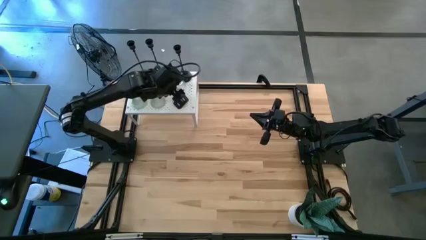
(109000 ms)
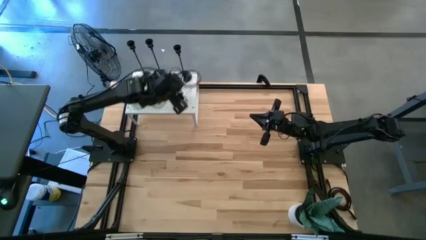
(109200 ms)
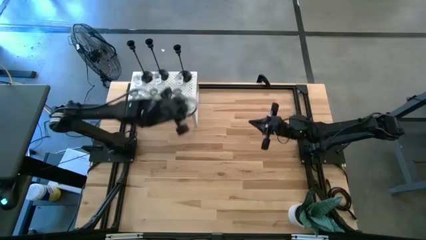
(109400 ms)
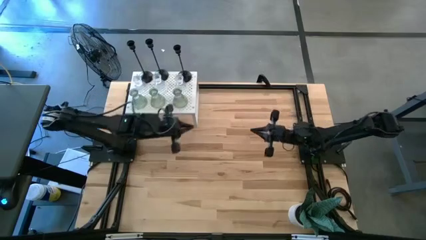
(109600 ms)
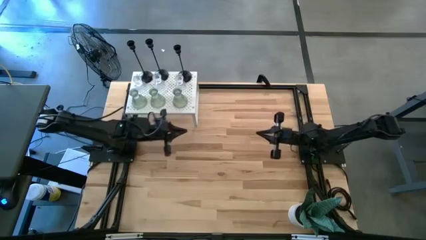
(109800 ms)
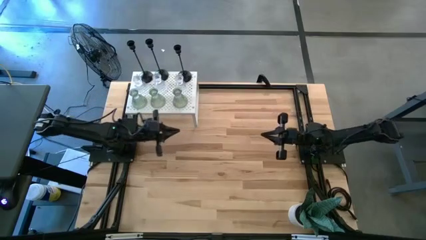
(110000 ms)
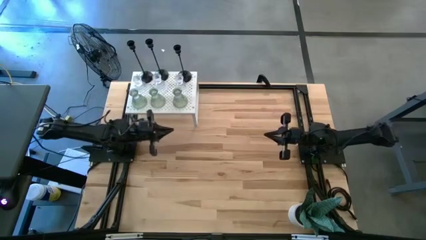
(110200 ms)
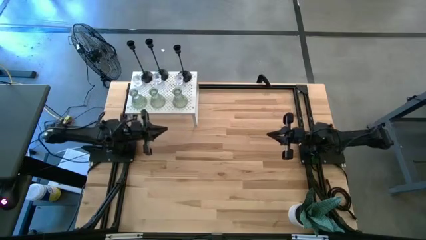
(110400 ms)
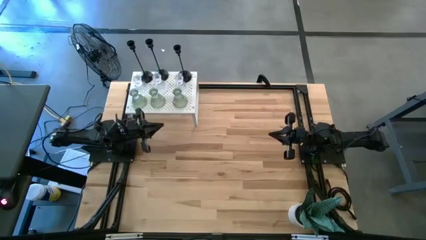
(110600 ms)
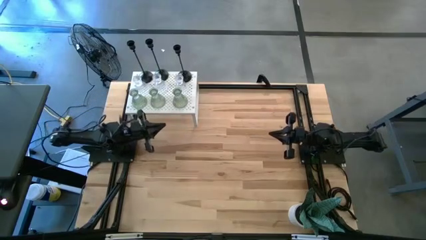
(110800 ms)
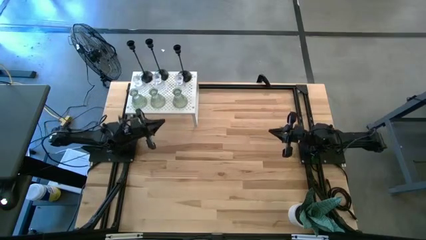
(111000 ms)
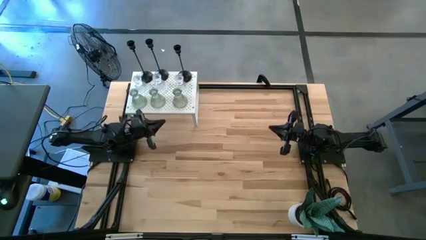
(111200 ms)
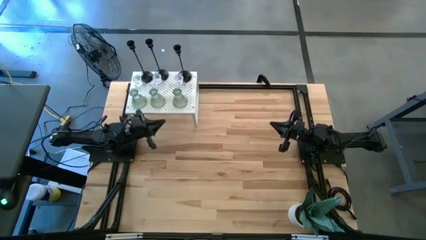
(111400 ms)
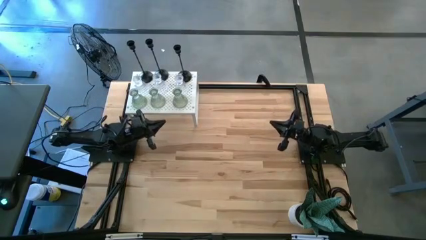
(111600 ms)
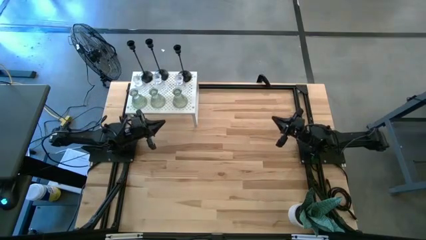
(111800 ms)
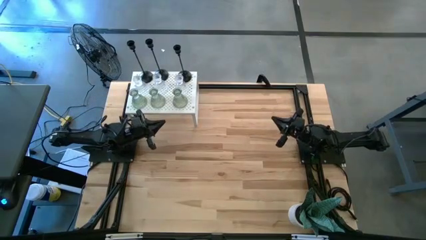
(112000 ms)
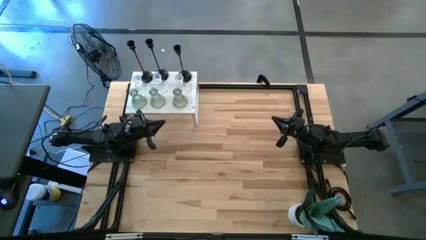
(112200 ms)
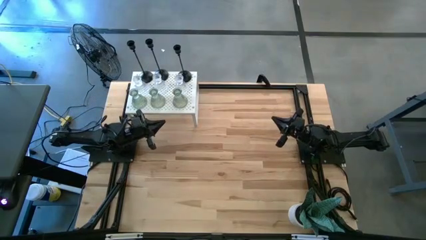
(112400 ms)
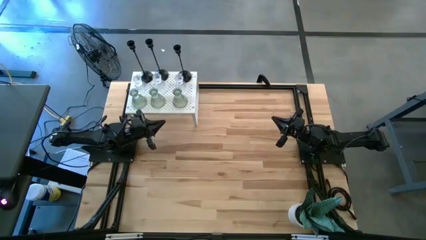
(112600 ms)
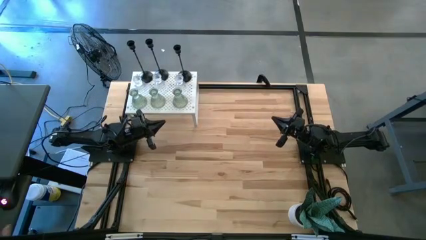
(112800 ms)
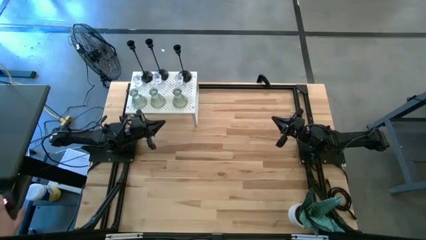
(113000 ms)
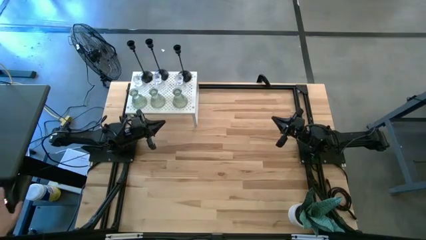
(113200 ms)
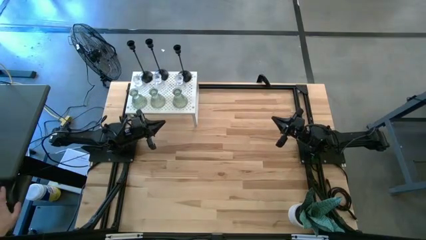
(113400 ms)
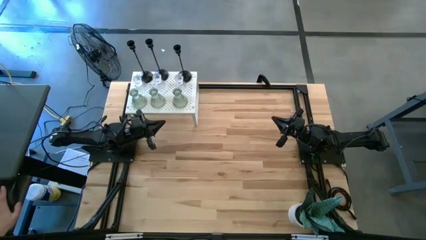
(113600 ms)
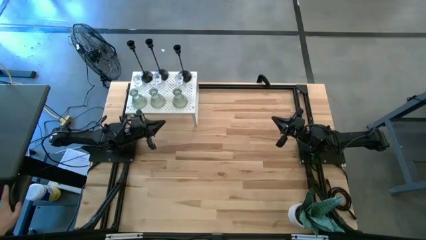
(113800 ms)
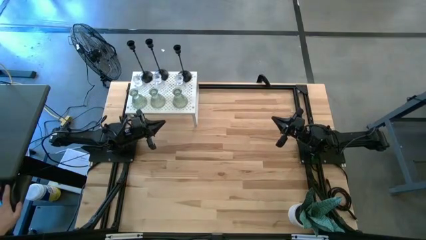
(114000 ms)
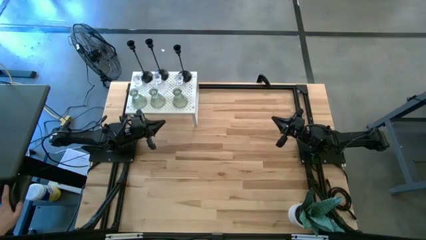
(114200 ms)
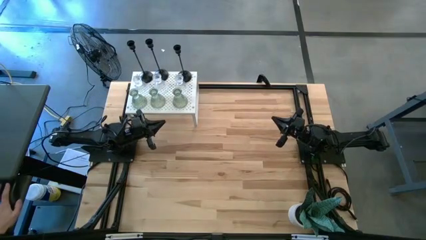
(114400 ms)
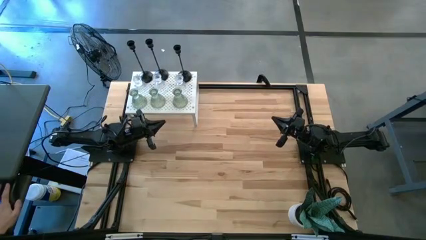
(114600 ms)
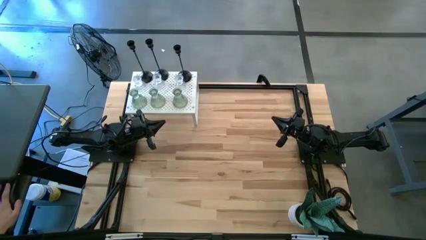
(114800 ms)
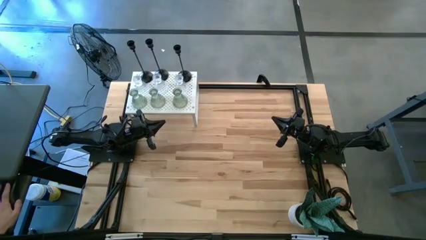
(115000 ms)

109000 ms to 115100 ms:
Task: Pick & Place candle stick holders
Return to Home Position

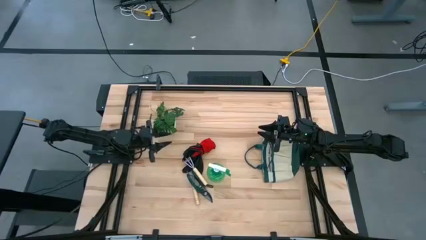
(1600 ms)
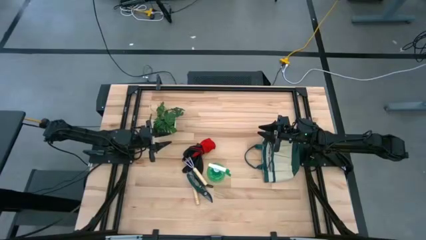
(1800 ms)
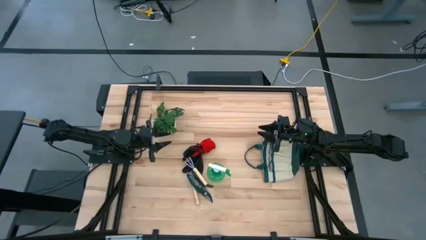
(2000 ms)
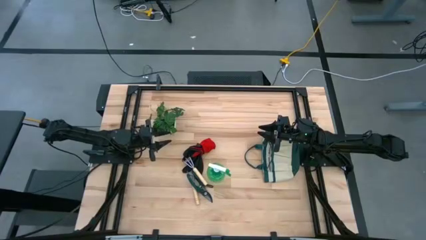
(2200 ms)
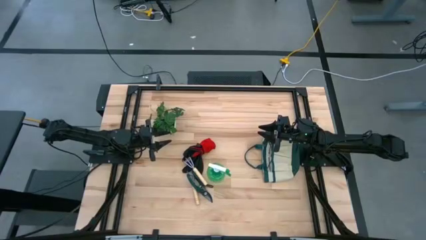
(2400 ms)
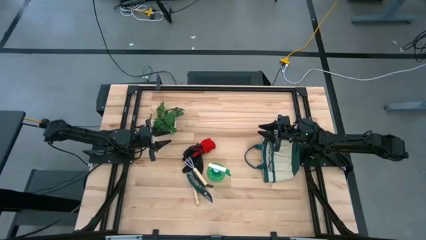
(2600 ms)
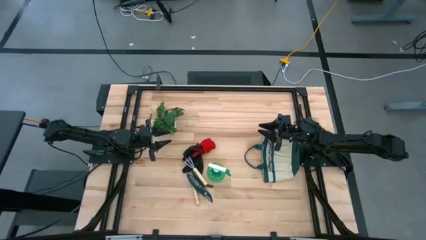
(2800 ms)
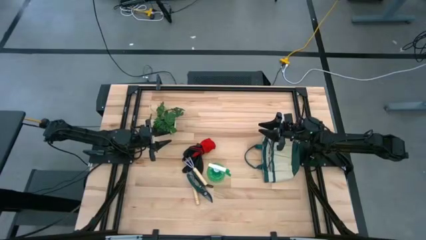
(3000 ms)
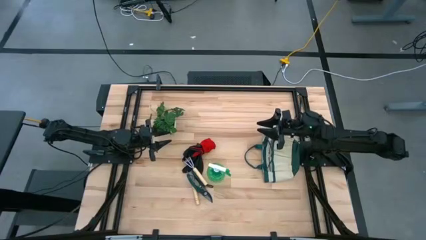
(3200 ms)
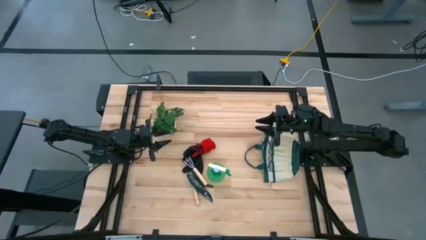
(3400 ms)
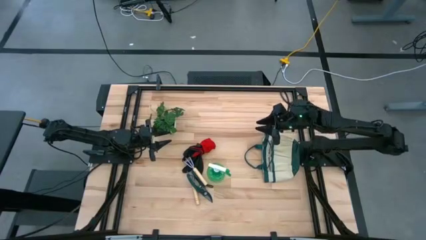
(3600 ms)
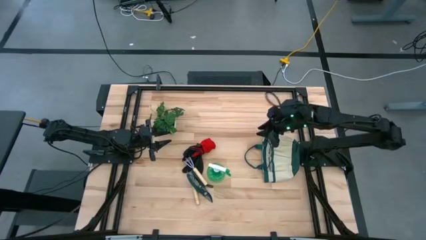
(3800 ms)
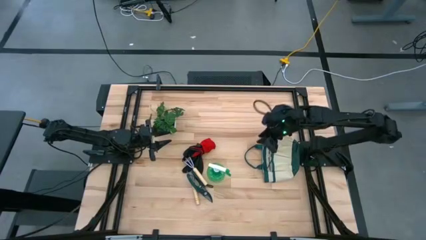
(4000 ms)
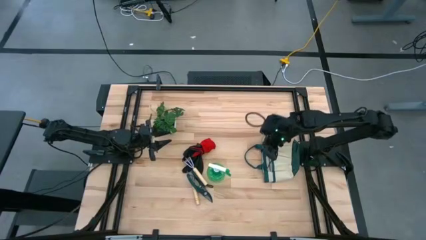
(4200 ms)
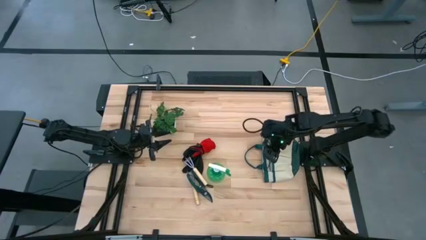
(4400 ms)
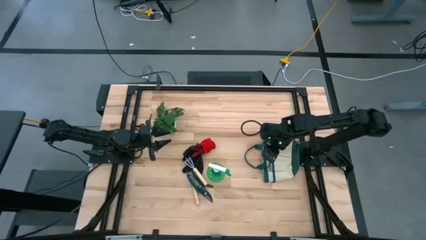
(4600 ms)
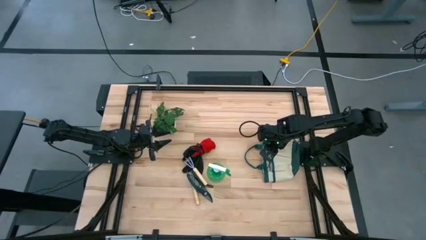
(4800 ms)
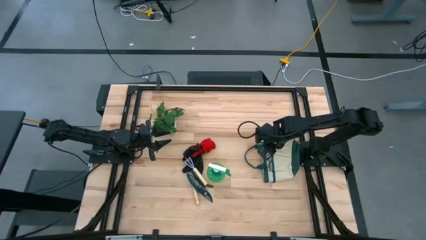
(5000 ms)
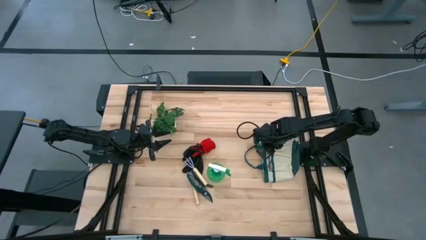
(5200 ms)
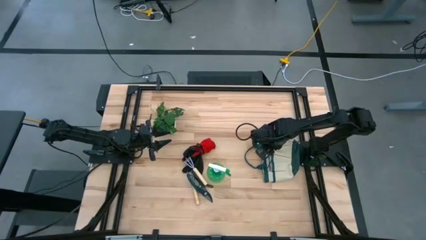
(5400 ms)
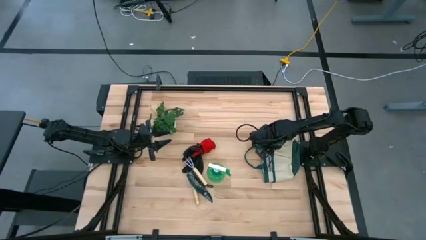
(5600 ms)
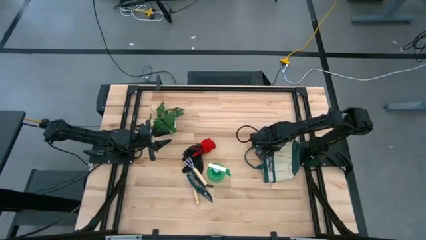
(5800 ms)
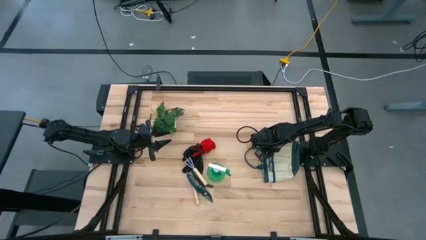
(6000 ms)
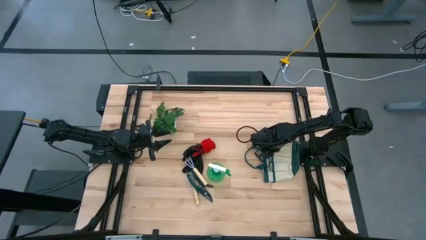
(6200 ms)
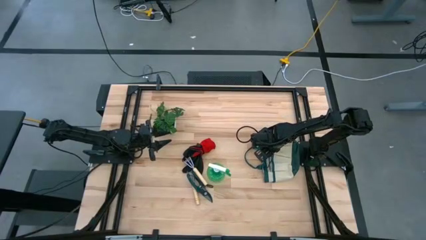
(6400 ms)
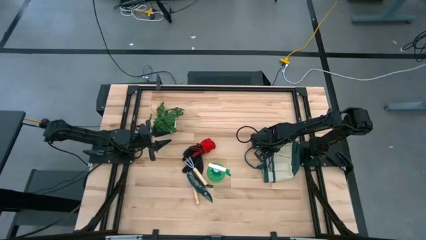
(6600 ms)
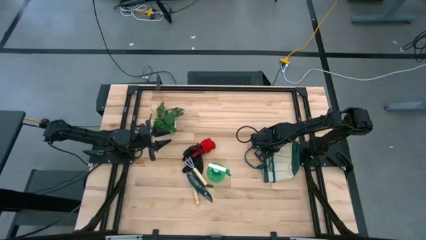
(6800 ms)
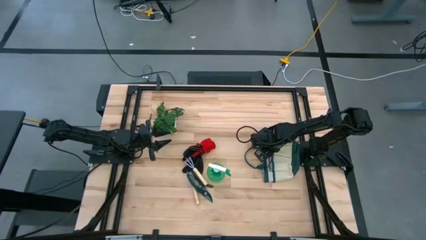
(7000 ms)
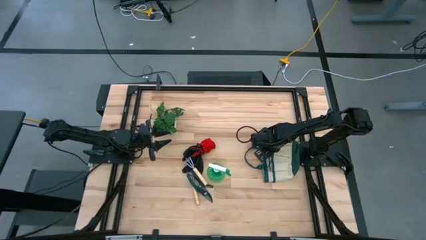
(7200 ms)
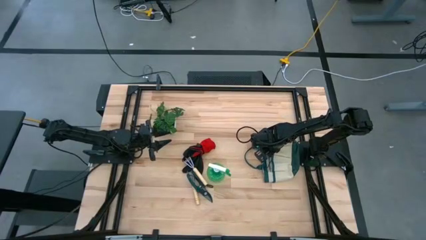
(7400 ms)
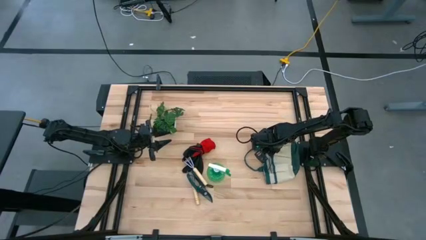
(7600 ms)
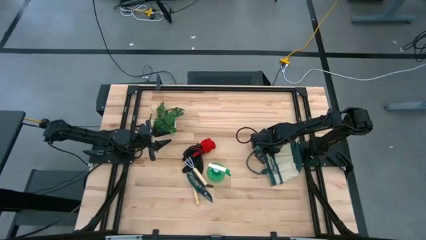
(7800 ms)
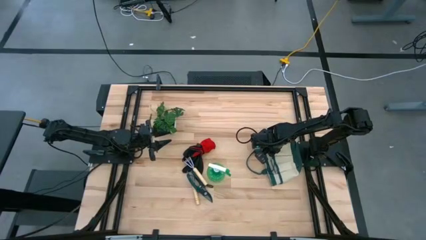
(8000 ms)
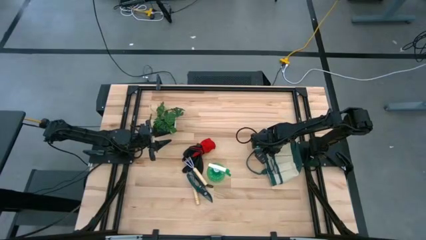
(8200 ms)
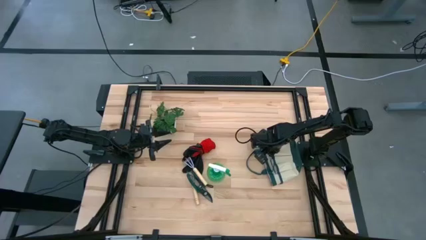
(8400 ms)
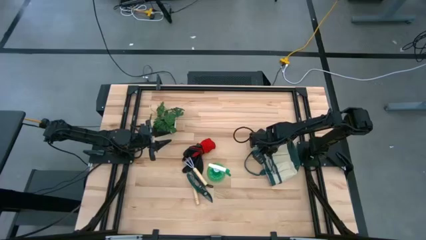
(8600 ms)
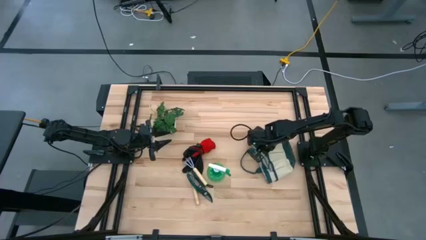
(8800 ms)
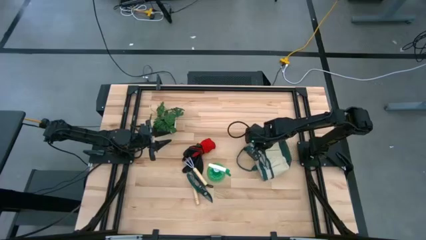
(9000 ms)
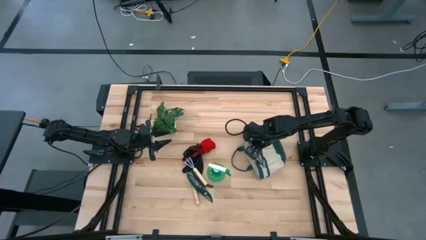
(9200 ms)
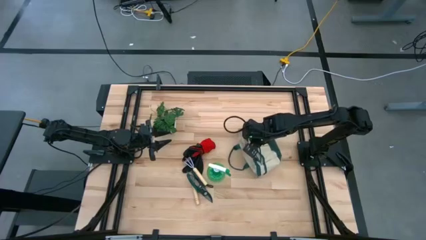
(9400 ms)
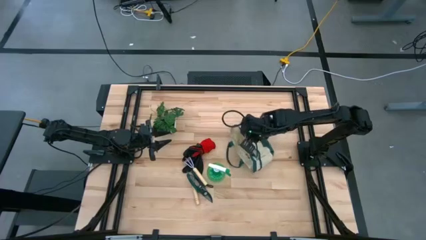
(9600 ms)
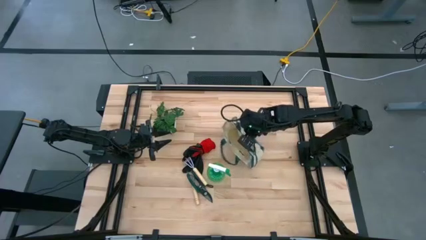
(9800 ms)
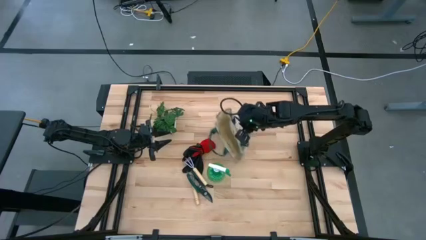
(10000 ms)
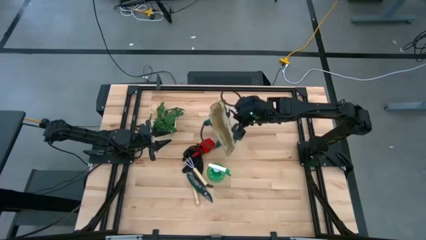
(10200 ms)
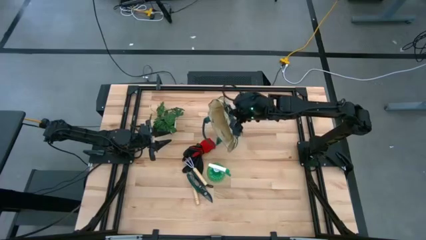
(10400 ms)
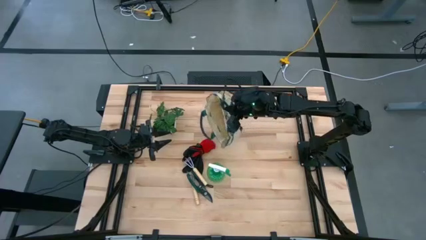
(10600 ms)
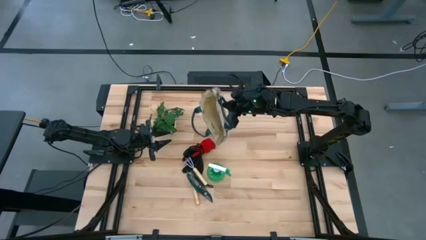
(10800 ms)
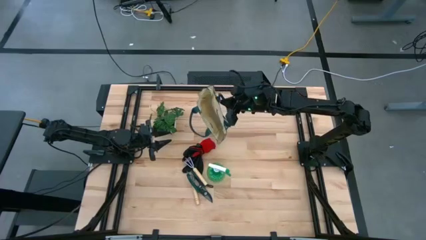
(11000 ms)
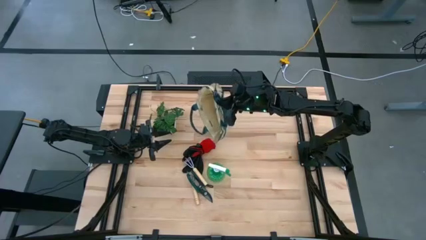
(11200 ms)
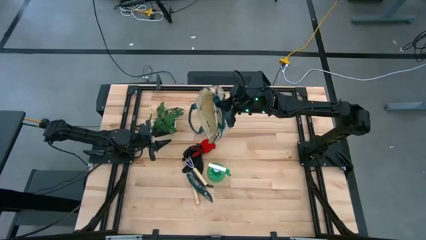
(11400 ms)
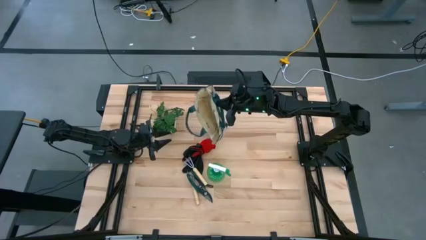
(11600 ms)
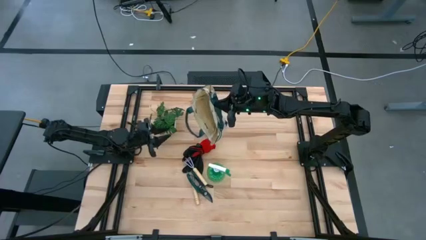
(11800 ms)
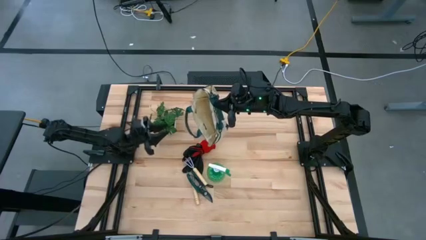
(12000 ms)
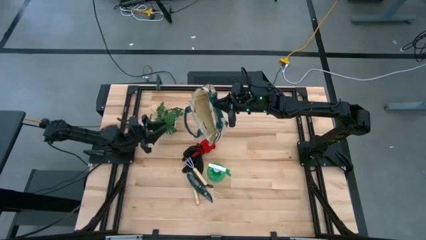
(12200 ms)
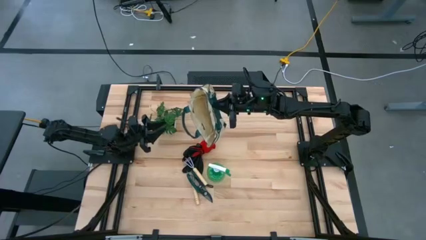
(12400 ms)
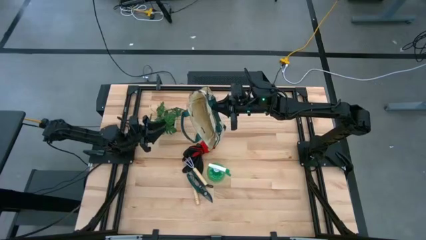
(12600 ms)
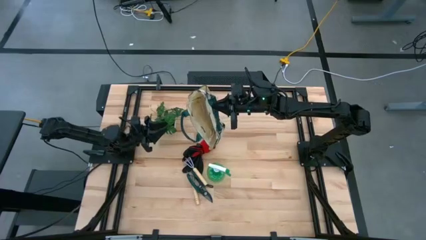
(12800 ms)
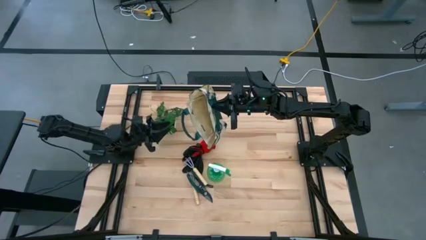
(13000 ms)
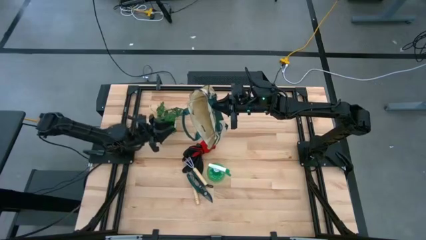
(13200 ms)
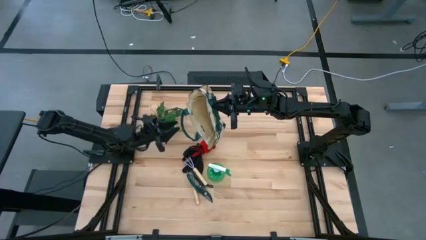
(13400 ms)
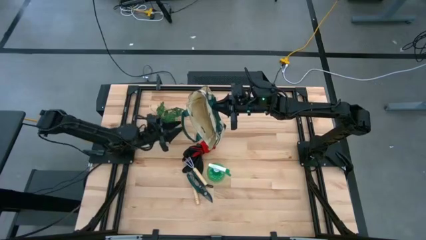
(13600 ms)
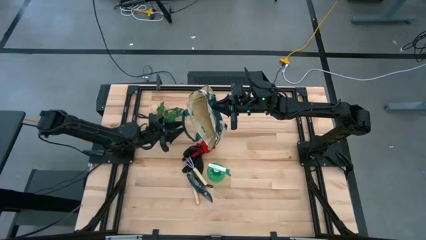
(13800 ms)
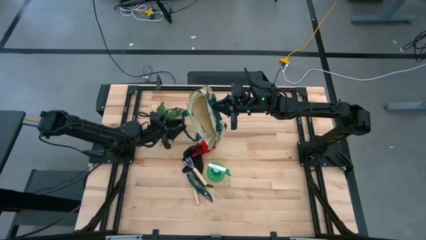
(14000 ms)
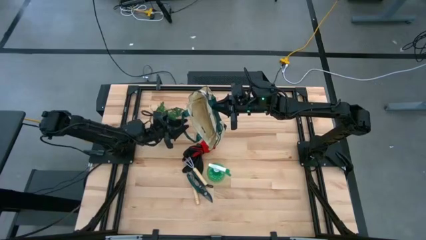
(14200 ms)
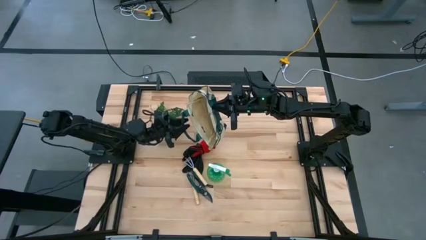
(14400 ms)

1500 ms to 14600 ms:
Task: Pick & Place Garden tools in Gardening bag
Prepare the white gardening bag on the table
